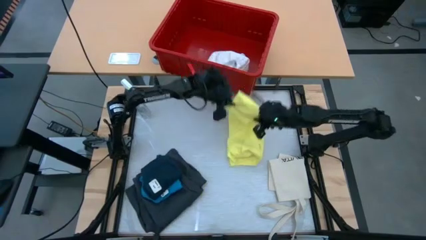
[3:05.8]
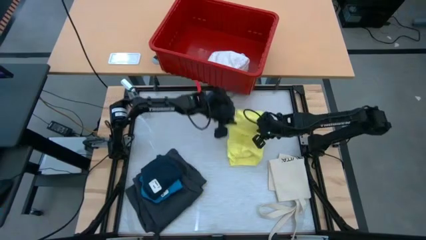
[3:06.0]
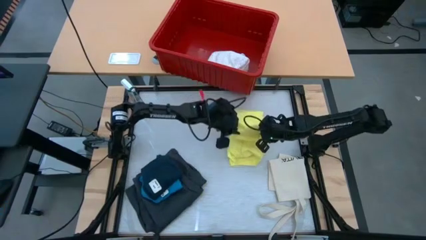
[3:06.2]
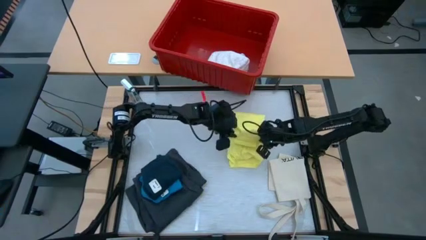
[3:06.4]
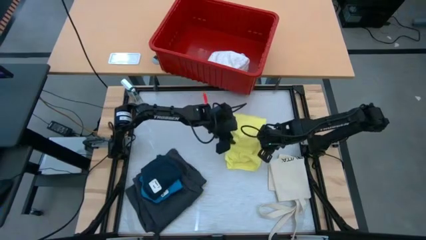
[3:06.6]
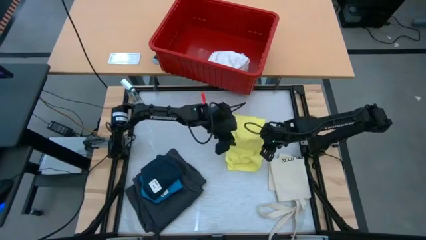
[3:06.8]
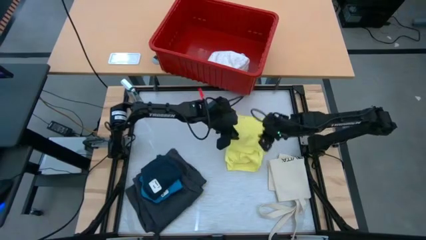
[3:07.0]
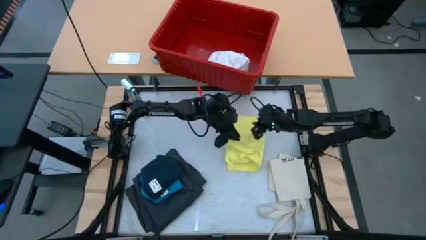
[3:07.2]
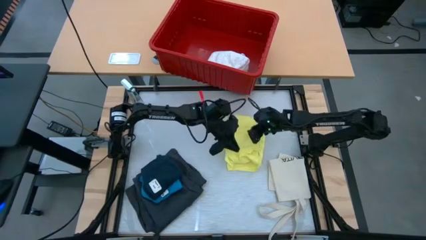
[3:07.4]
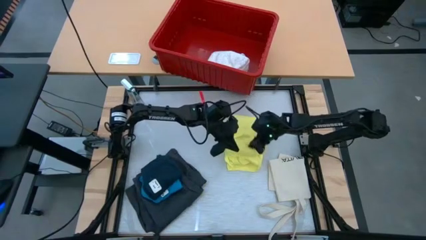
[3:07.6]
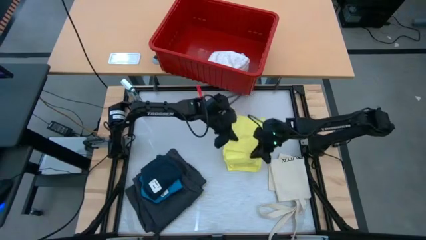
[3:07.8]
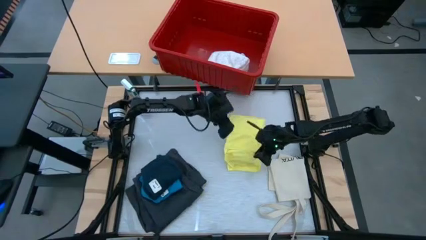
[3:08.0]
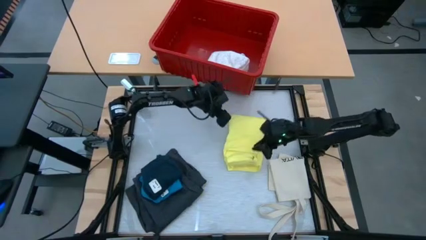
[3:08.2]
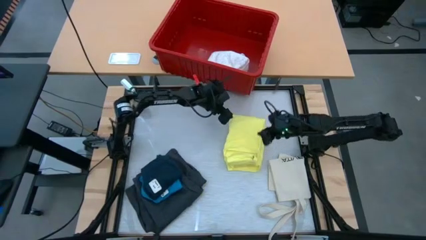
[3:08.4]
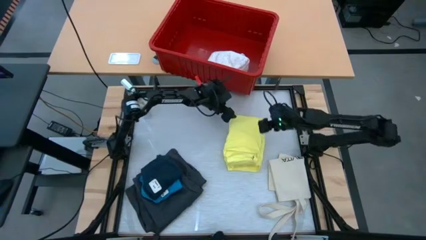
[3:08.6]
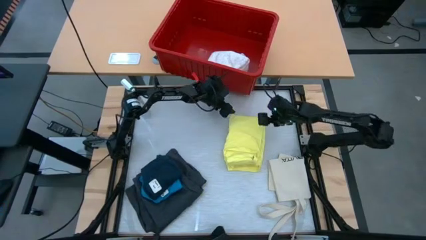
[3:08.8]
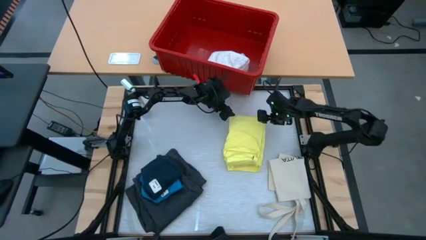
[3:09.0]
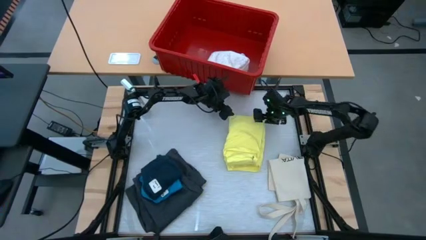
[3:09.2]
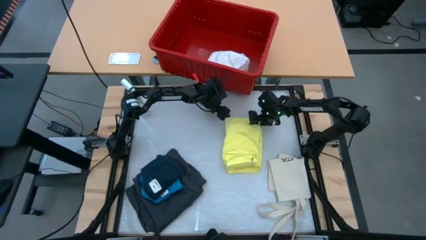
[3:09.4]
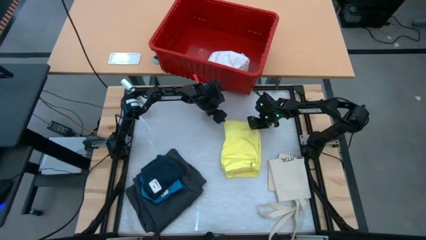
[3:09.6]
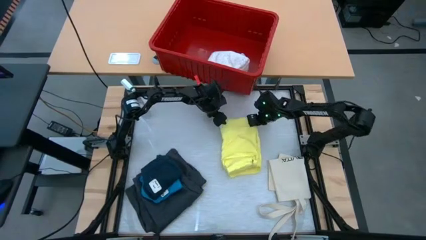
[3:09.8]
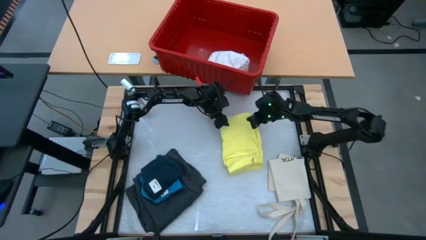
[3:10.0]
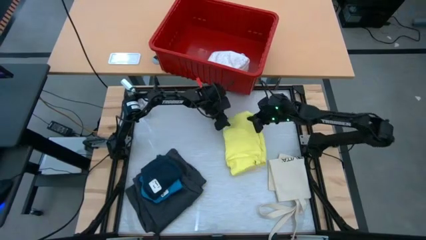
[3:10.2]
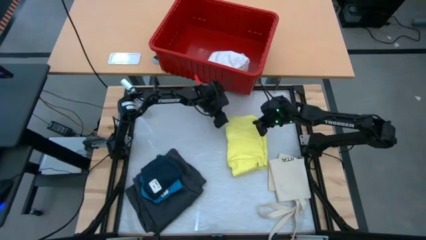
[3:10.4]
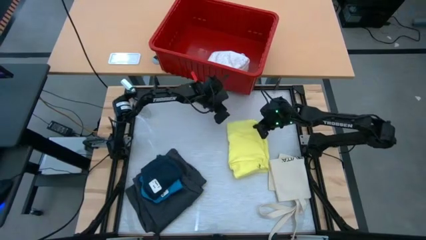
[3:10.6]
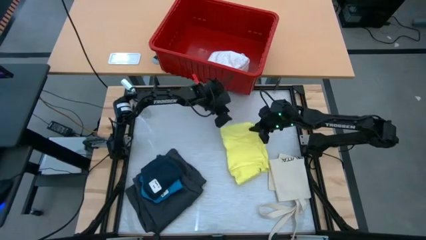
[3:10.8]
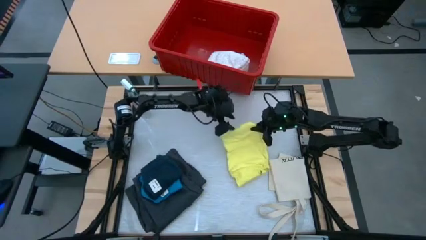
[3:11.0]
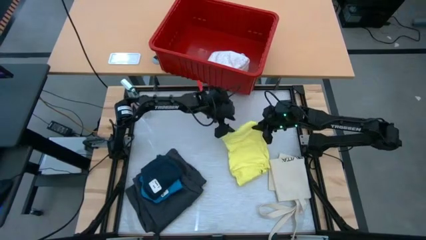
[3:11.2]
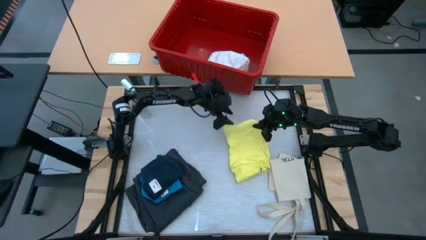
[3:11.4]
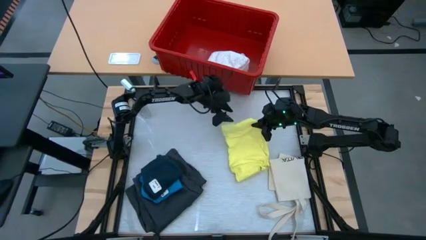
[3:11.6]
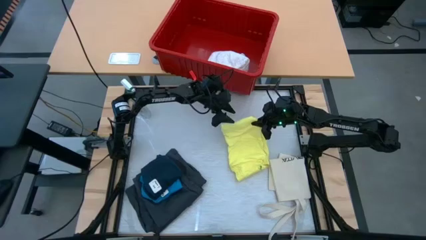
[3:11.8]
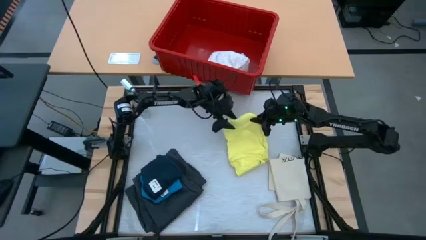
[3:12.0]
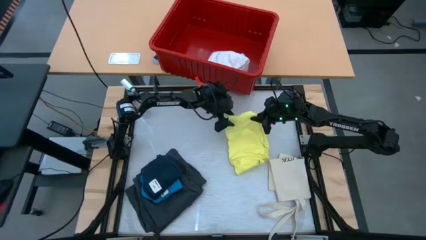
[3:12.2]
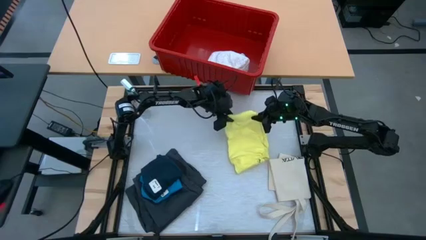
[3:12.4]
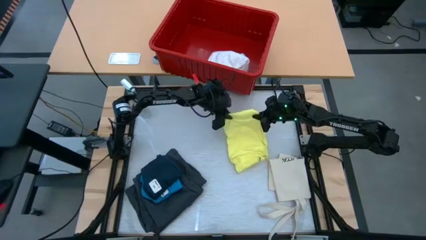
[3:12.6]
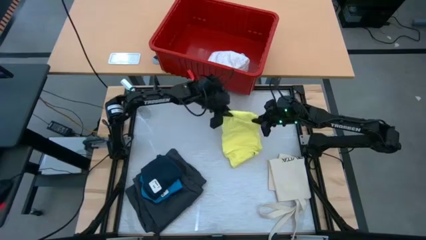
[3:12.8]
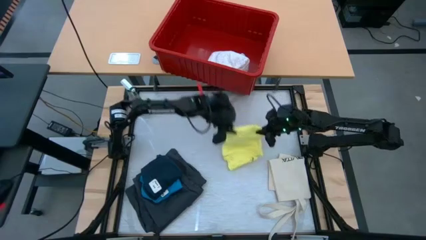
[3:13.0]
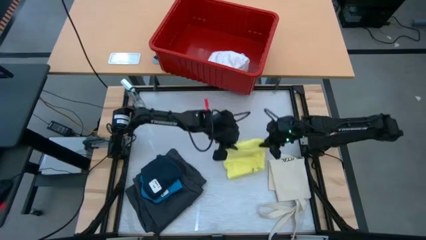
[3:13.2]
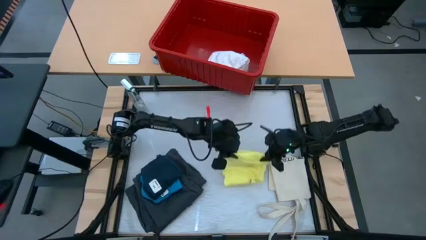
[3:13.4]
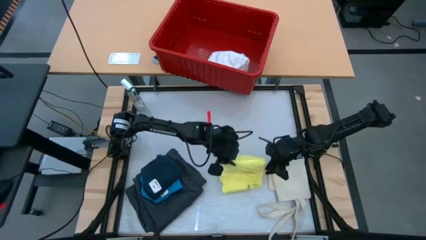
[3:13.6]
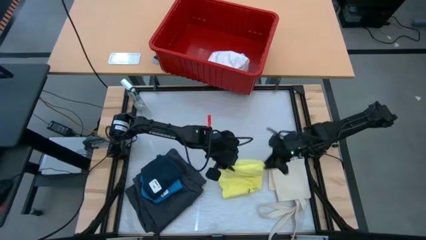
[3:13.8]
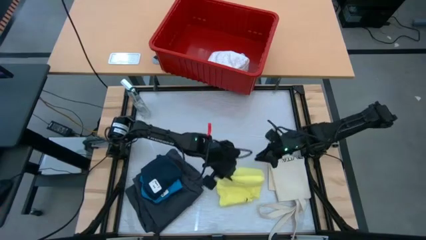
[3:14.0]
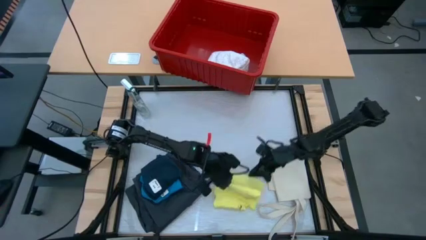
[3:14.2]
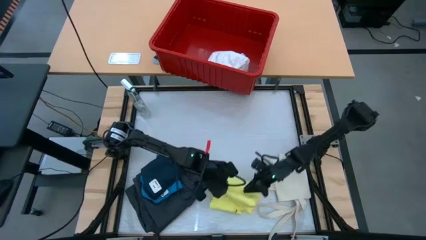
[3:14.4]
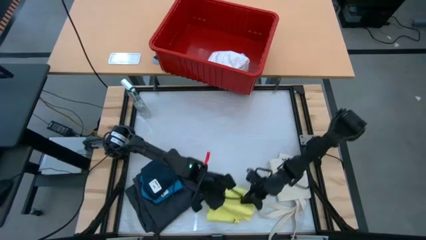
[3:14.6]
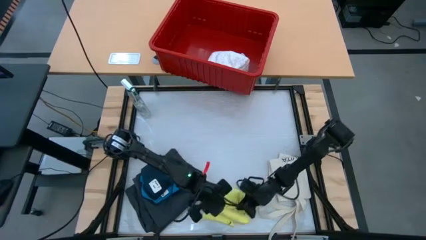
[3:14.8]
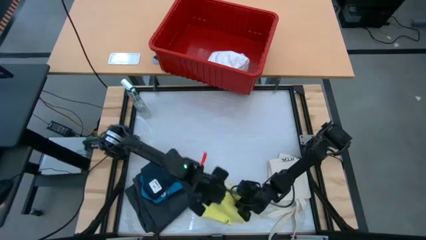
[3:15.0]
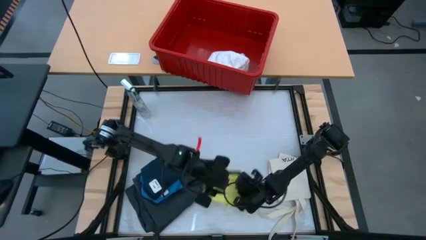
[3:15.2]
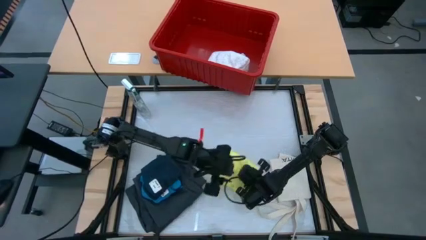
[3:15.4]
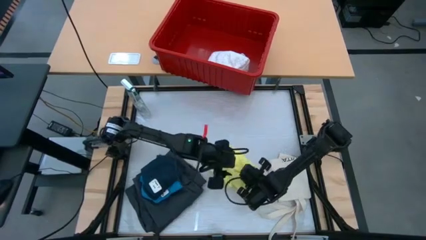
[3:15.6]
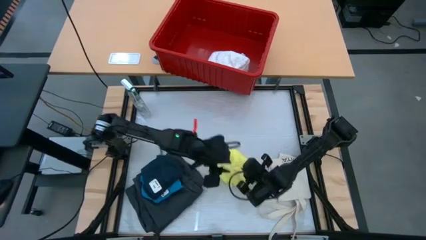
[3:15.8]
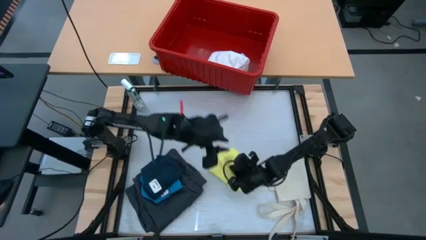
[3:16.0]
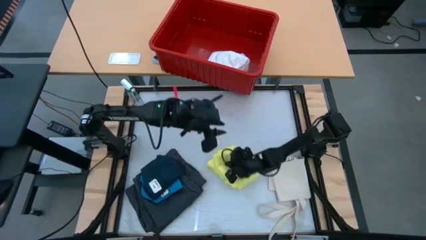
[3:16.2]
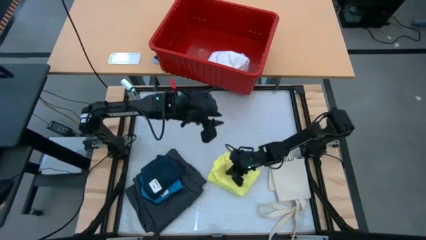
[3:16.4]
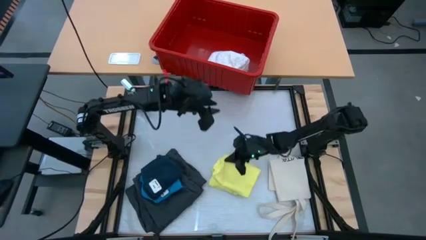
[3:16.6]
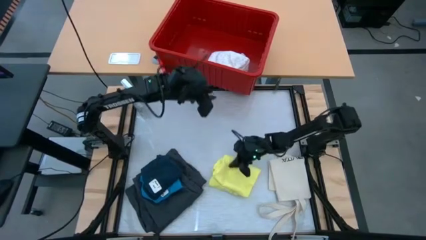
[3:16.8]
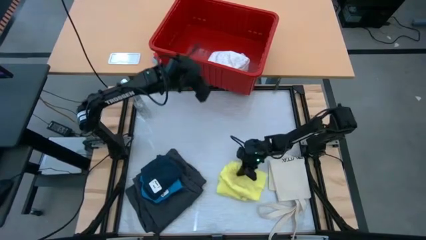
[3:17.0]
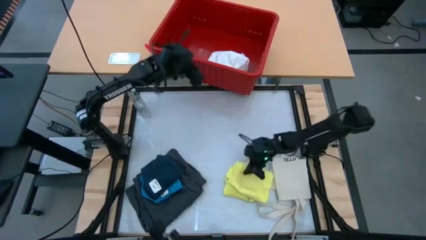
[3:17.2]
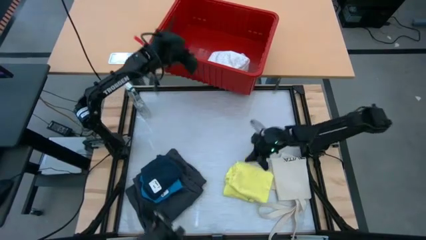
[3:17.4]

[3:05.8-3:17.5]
Task: Fold laundry
Fold the yellow shirt
